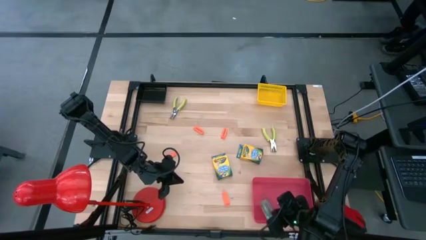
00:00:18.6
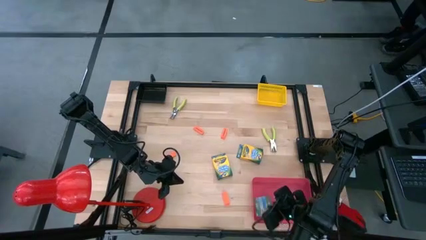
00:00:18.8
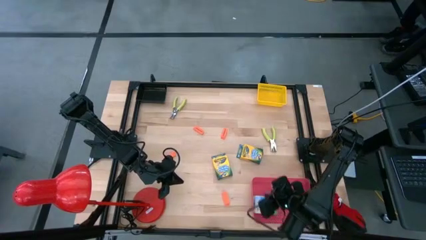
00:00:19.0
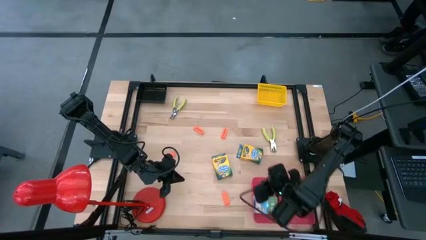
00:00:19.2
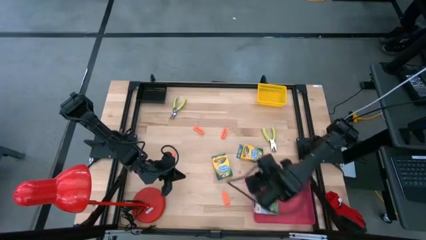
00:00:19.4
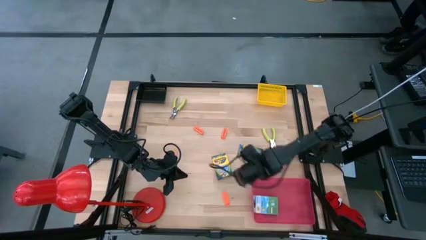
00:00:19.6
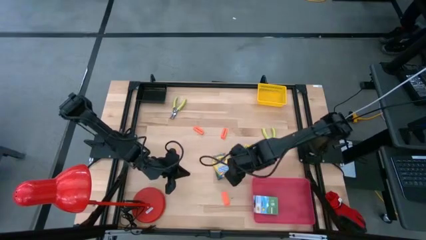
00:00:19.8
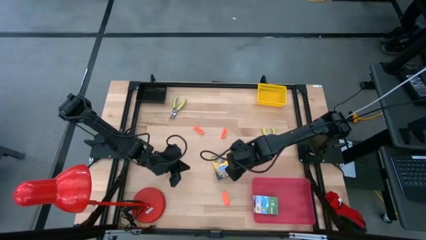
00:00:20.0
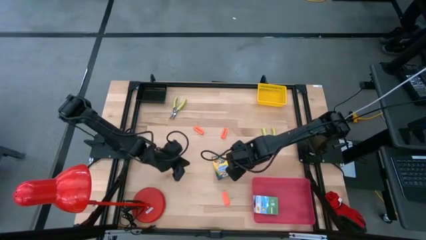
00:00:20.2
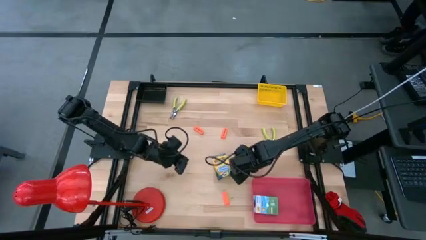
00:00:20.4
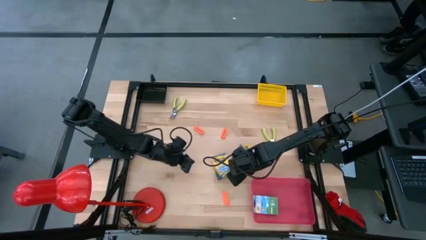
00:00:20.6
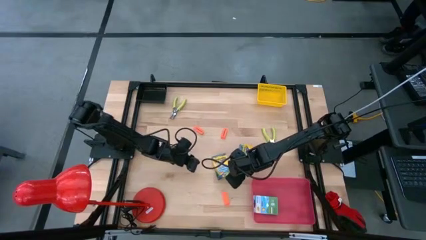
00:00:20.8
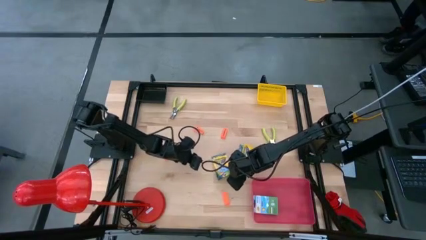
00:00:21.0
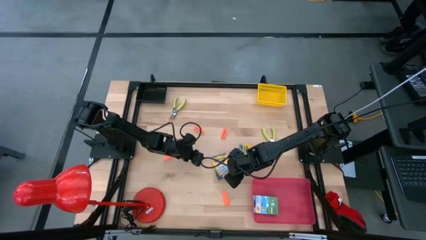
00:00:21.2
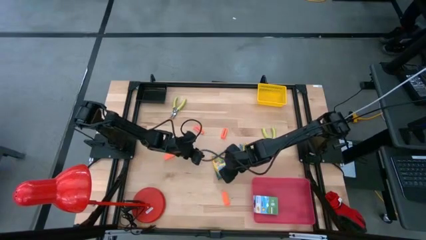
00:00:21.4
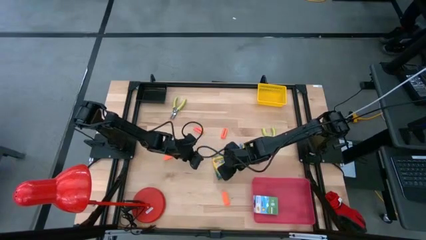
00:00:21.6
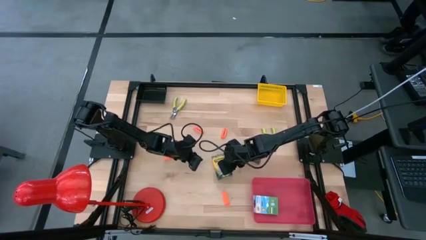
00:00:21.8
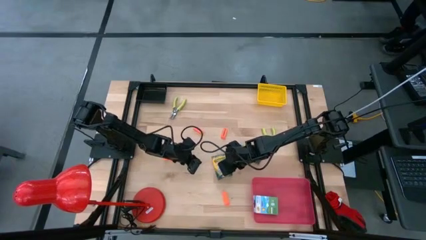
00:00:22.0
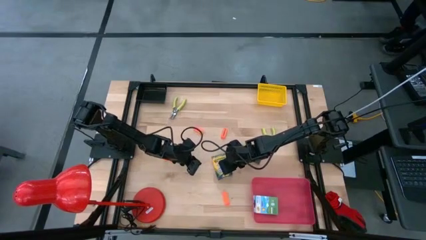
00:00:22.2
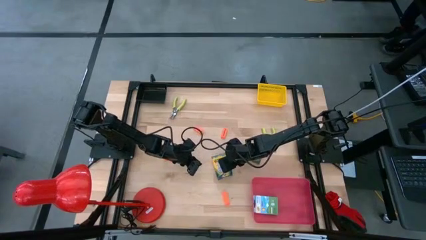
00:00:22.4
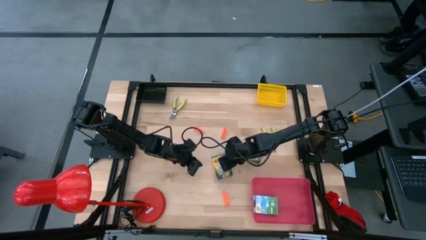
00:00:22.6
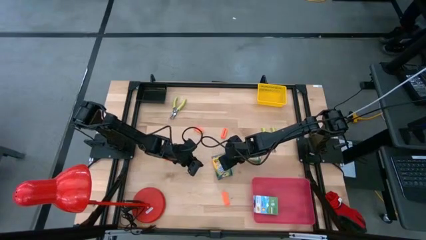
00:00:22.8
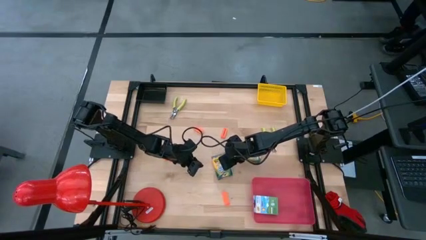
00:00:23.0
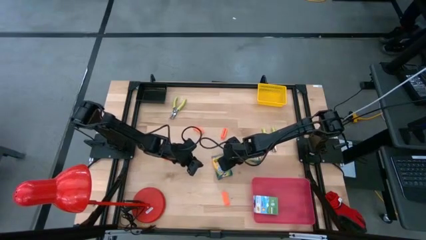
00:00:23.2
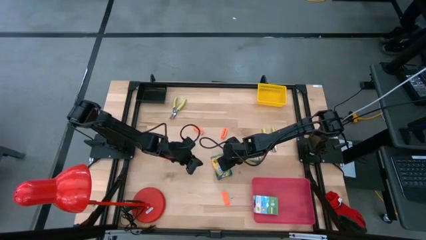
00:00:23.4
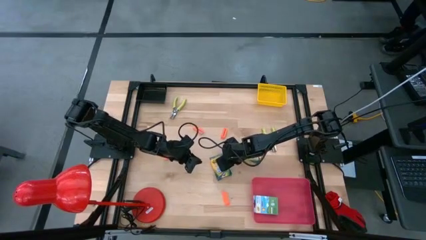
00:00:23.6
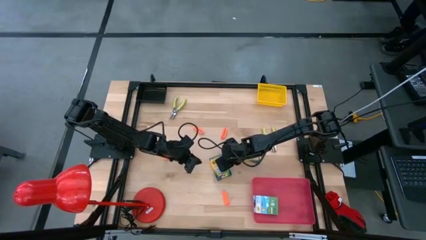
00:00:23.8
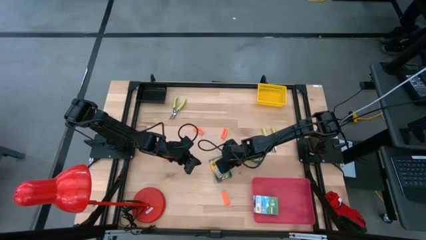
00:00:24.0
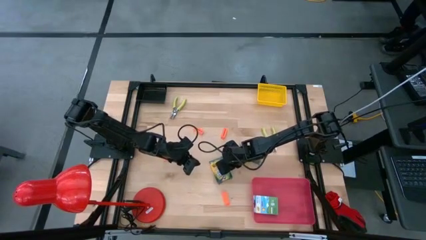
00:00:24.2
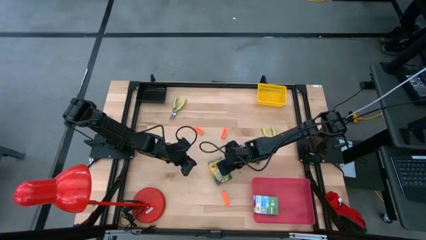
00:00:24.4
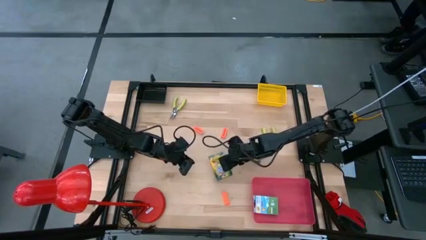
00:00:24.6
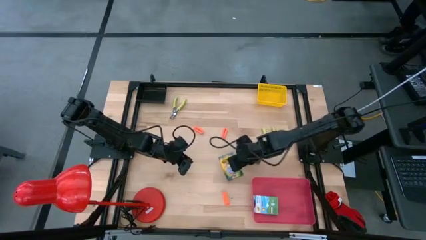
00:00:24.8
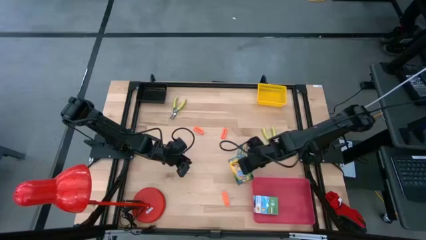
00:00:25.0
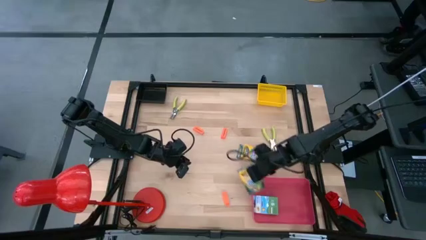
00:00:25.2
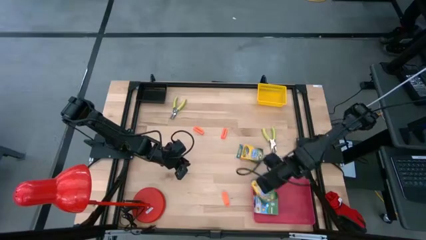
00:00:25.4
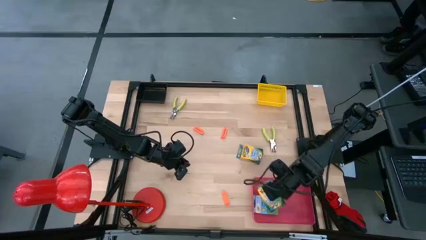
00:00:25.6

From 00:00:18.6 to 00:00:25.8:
Task: Pick & Place School Supplies
Put the crayon box into the pink bin

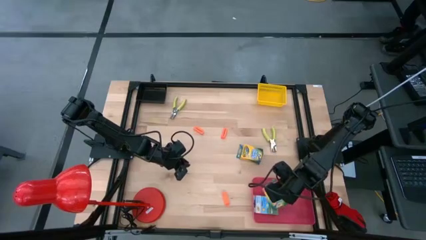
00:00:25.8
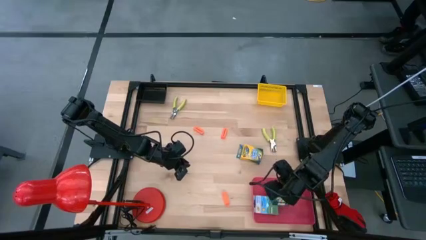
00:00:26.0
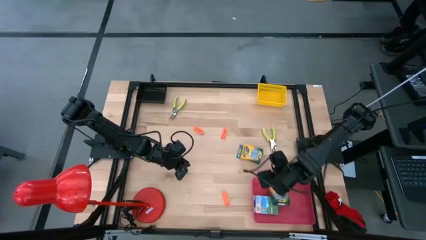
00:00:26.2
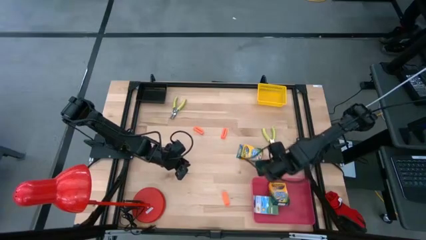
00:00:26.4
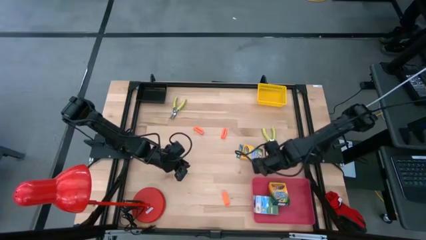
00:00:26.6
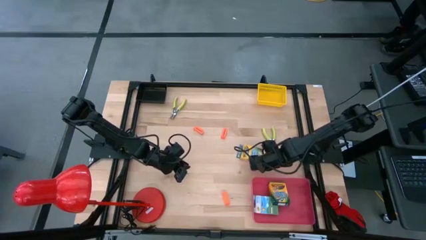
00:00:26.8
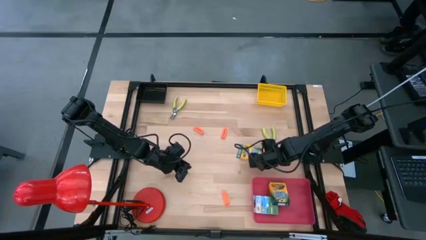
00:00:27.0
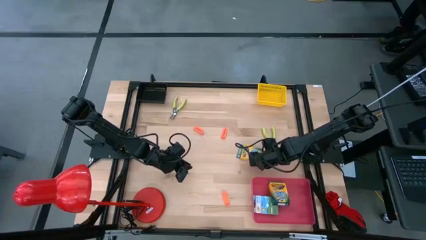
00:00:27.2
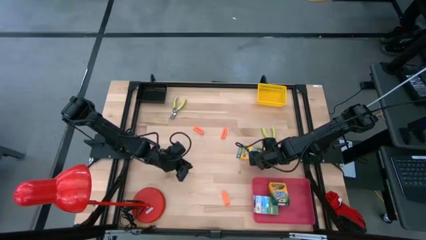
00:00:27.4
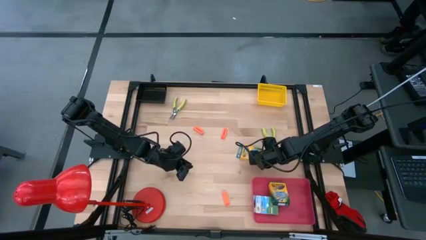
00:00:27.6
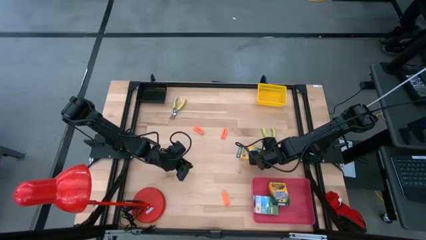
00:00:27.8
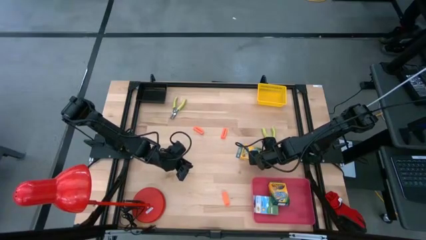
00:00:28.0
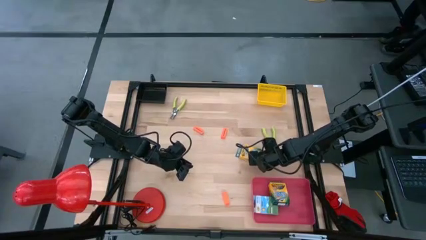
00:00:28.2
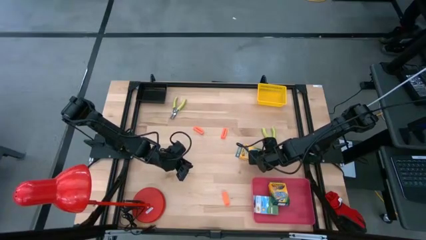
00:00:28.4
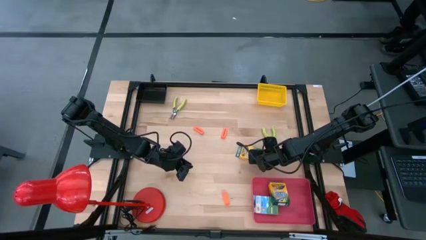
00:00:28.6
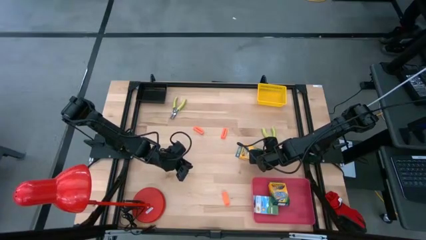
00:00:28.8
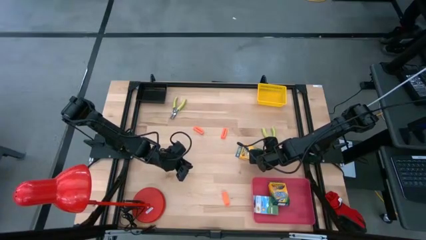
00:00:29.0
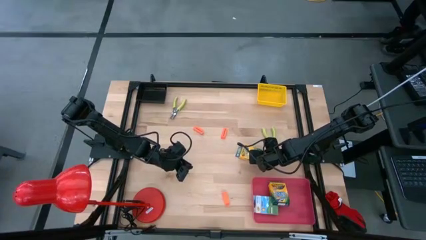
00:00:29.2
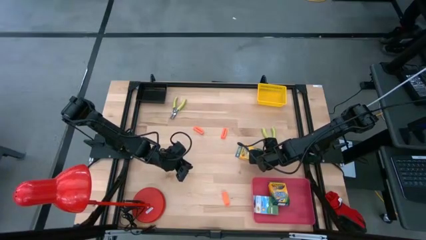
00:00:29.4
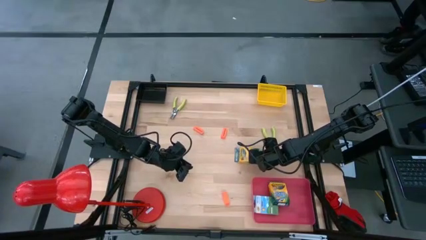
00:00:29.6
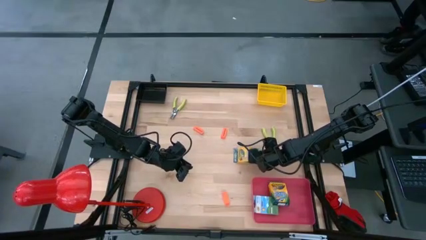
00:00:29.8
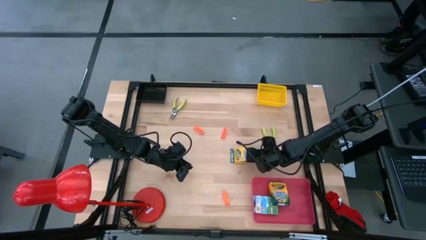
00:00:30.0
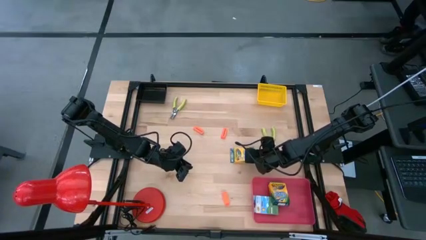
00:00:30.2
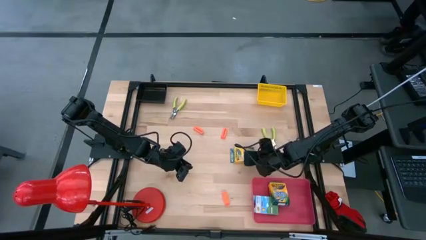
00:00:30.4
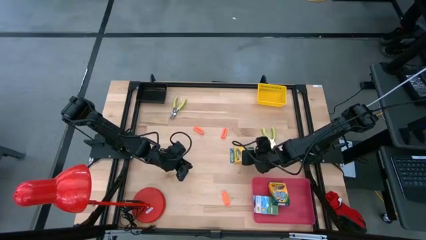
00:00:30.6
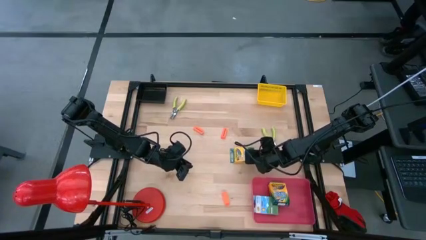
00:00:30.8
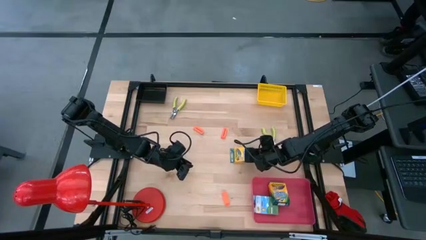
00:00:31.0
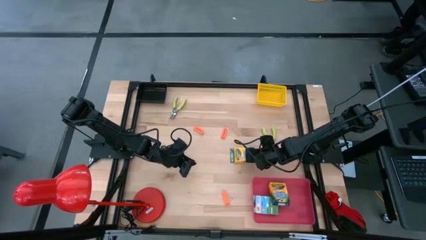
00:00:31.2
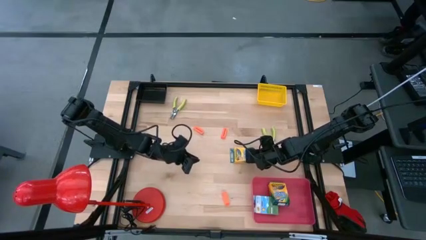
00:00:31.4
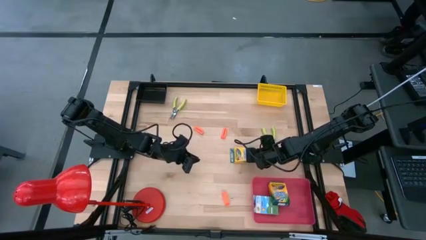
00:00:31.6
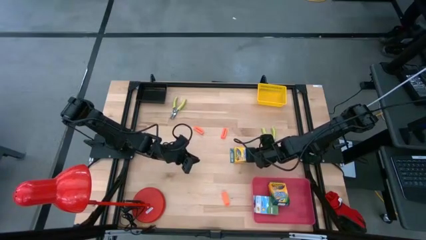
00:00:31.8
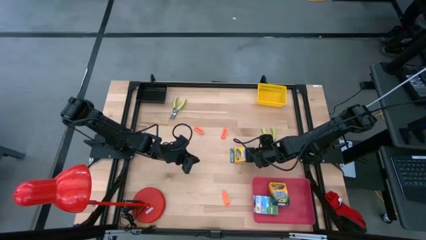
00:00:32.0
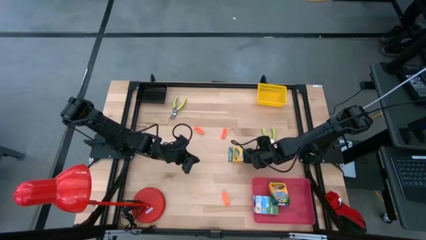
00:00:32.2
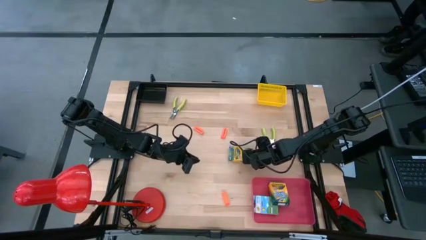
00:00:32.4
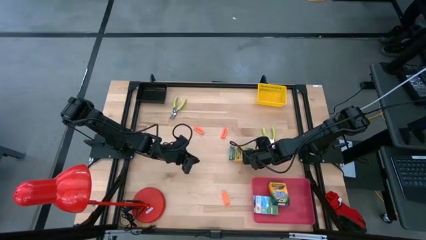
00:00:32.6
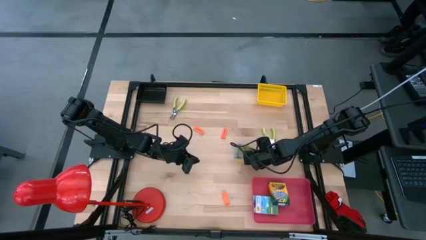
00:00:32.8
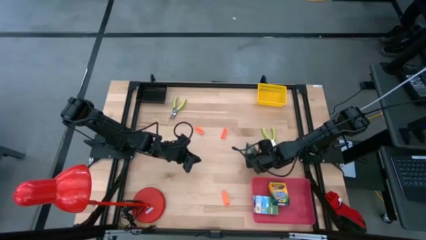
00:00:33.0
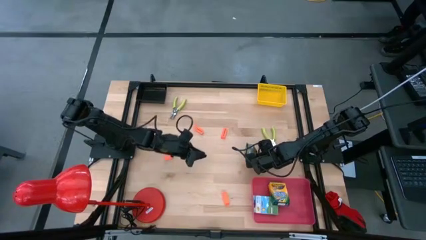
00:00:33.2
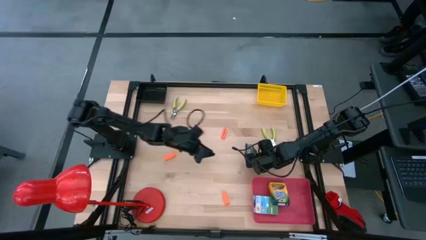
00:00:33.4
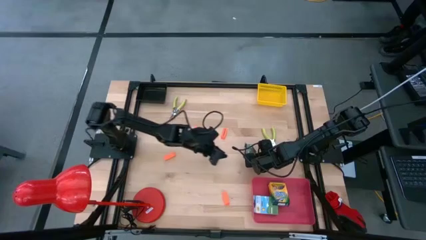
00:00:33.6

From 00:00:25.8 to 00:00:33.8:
Put the crayon box into the pink bin
